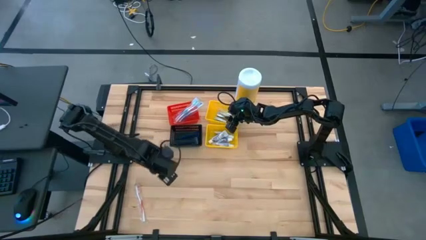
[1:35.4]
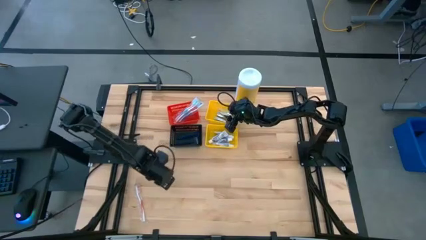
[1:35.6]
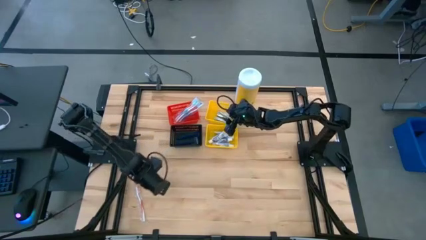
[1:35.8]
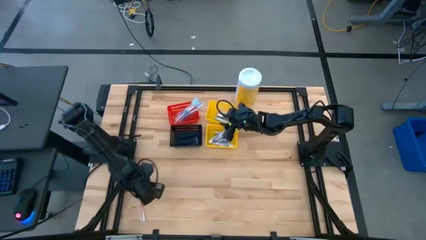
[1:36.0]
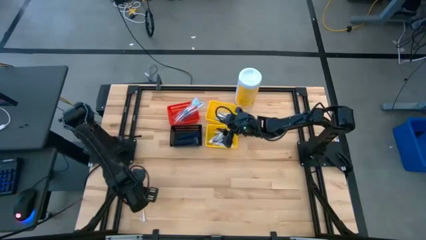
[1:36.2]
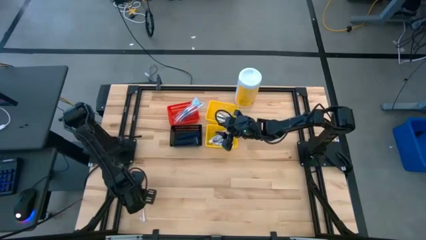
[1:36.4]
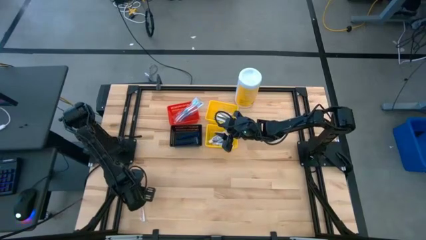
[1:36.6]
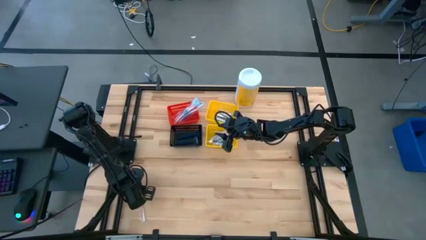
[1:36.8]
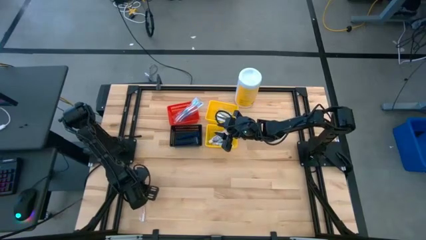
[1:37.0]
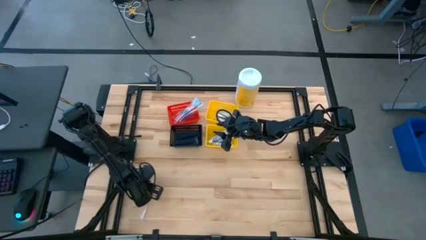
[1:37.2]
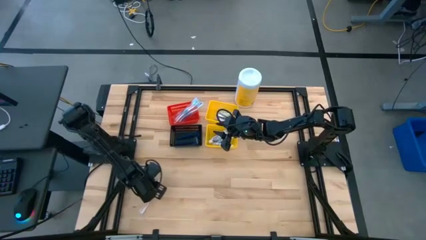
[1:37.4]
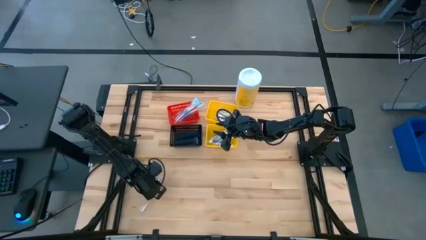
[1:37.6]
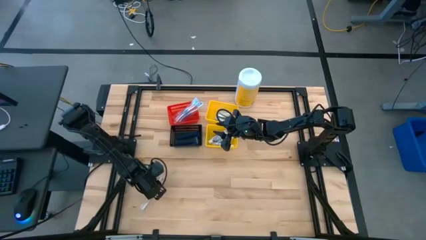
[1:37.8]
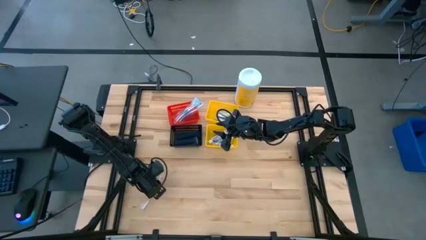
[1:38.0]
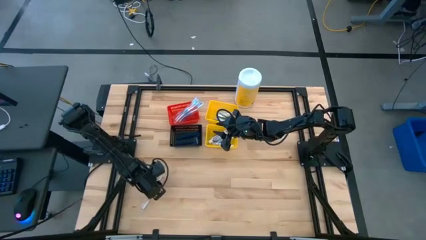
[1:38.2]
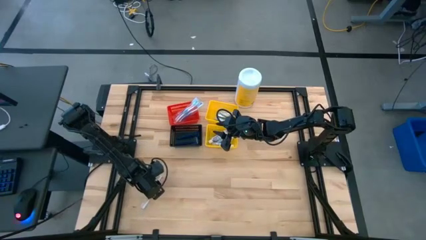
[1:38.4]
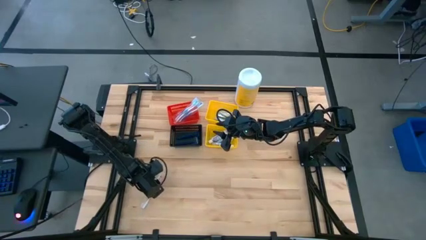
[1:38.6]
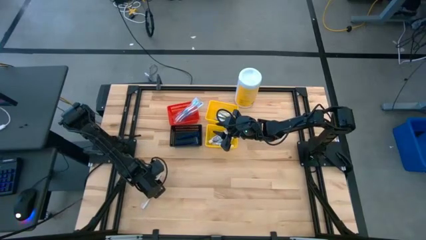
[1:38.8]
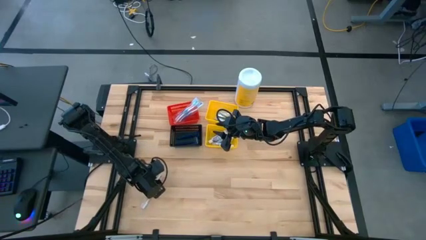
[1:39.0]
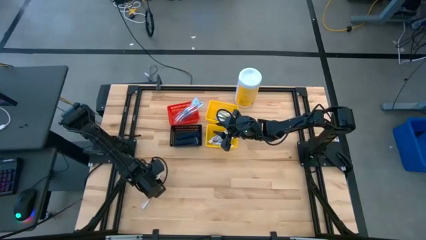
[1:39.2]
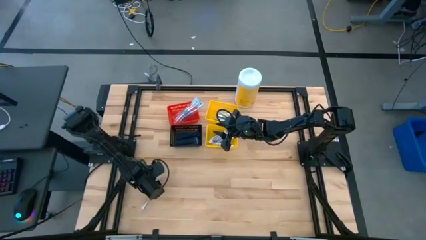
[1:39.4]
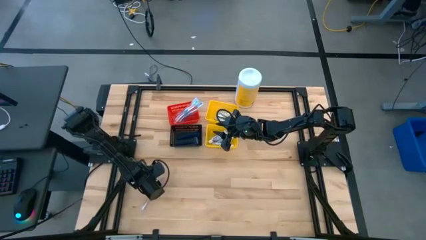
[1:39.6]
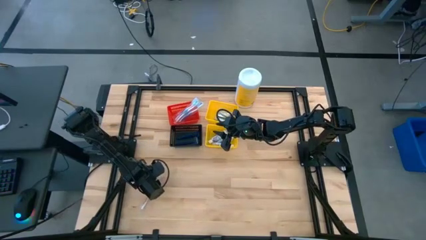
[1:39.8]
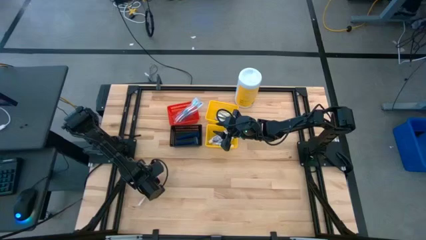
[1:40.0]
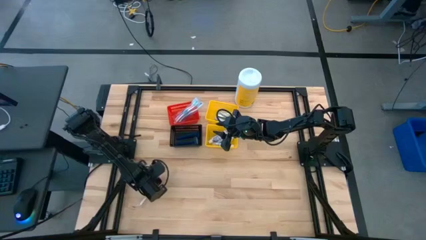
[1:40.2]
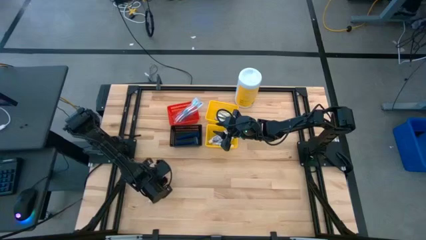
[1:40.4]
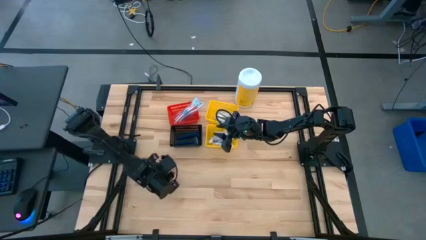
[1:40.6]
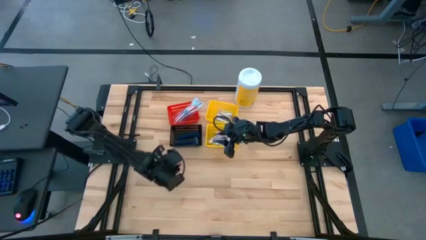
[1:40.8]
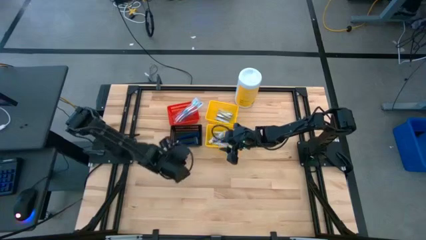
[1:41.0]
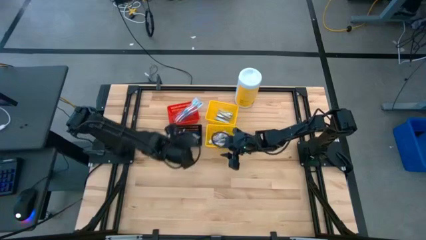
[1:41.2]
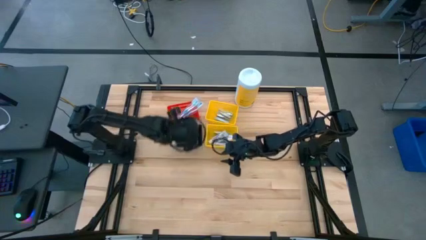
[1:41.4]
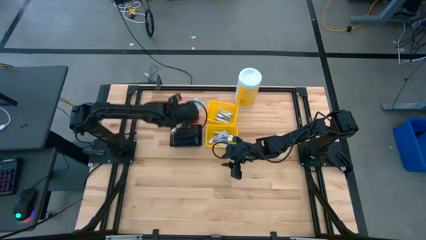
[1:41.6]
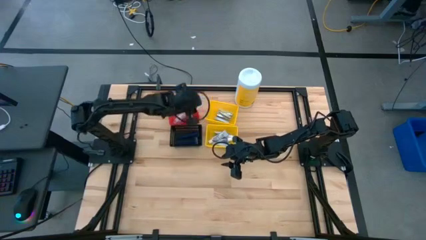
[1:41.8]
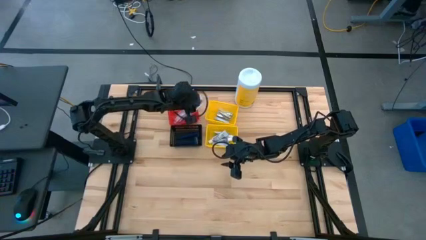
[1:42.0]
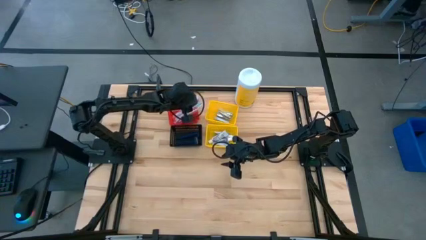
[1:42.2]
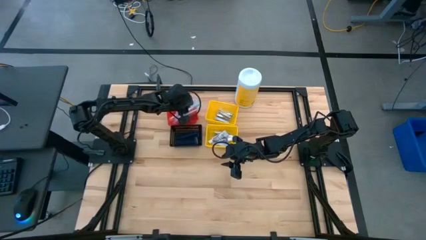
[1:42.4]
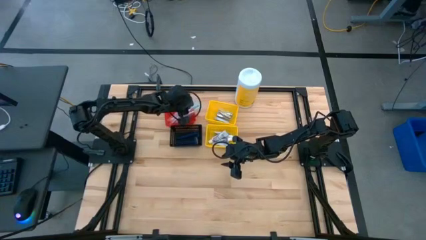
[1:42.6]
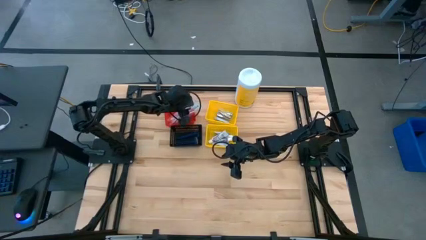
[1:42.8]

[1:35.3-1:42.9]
Task: Pick & Place Travel size toiletries
Put the red toothbrush into the red bin

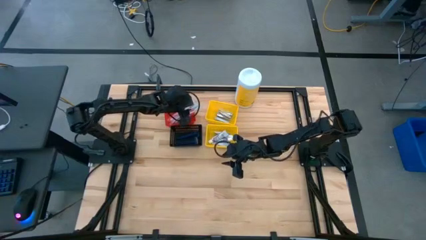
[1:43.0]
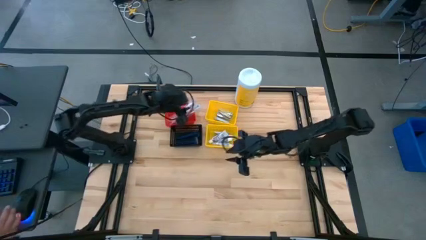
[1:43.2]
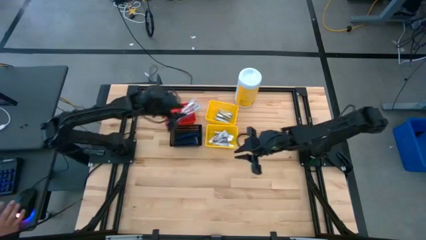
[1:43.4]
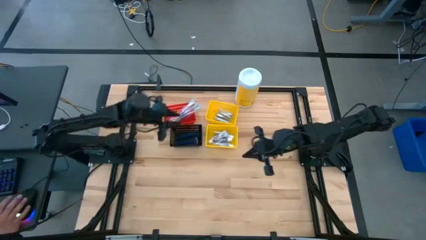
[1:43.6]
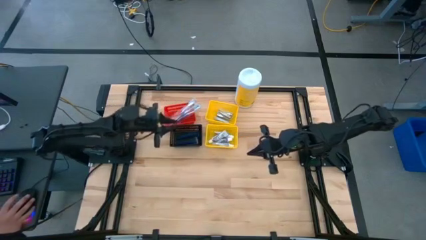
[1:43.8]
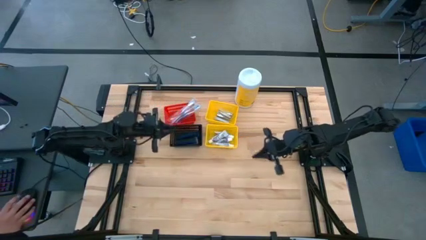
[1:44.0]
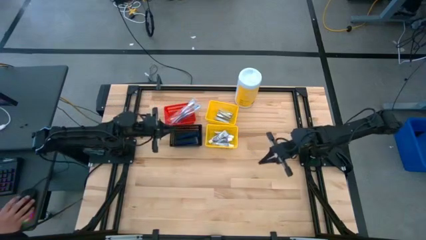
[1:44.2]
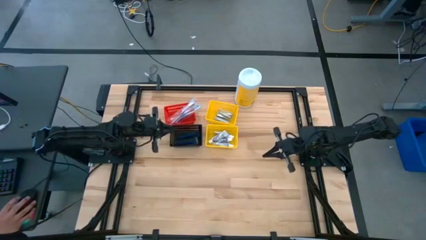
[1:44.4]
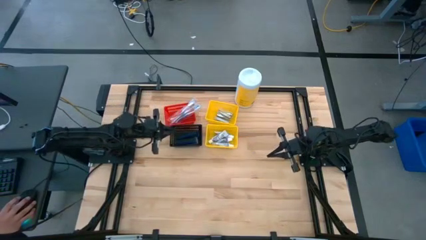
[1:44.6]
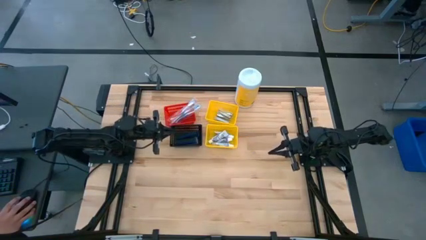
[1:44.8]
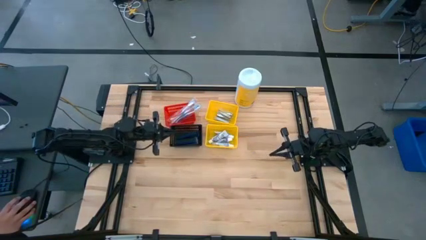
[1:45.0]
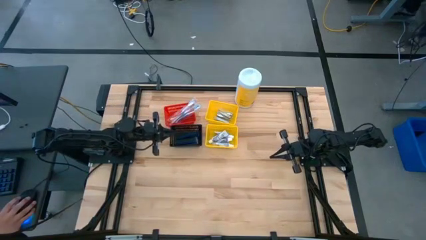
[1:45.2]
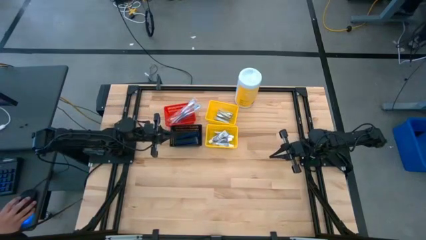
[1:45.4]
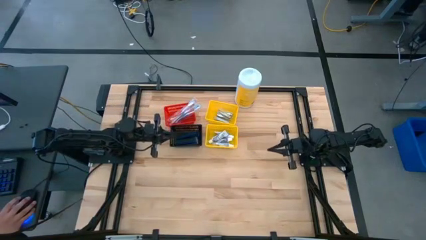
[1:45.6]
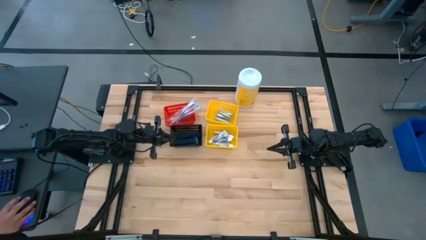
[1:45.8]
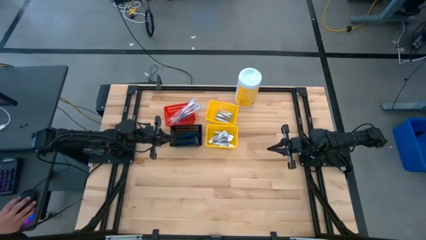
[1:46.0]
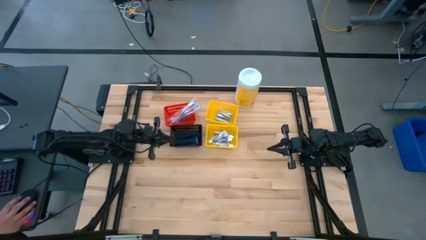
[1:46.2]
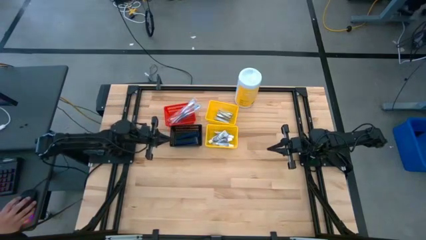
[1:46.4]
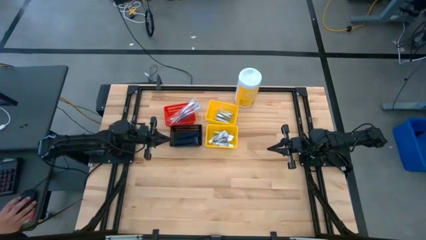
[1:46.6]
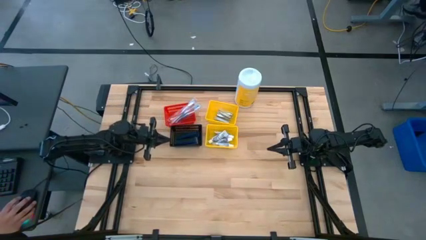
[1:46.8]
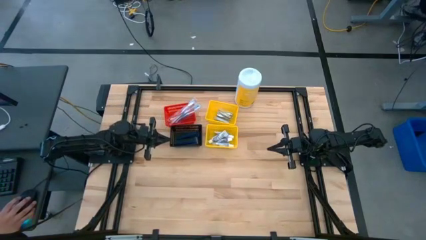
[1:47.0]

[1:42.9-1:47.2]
Return to Home Position

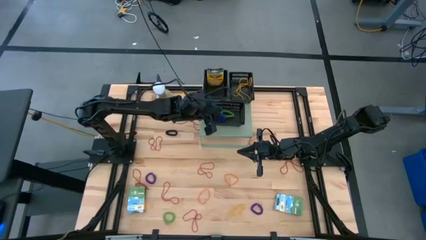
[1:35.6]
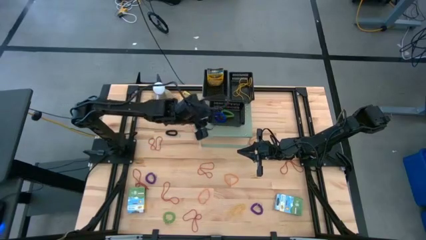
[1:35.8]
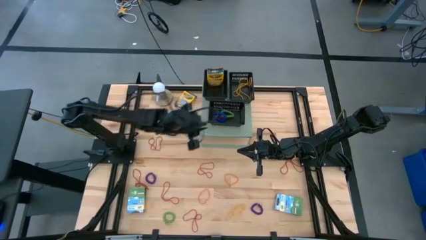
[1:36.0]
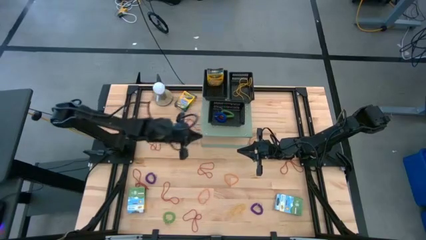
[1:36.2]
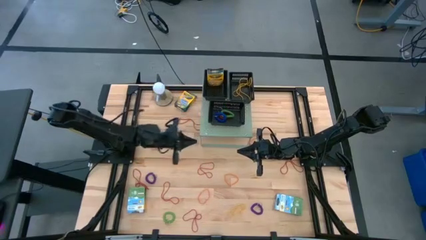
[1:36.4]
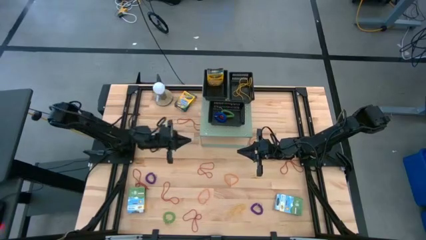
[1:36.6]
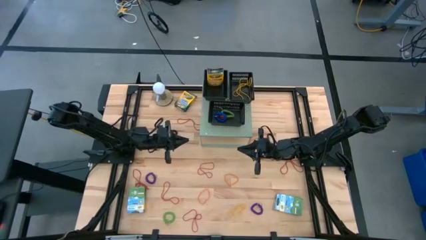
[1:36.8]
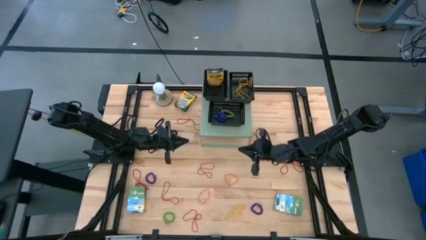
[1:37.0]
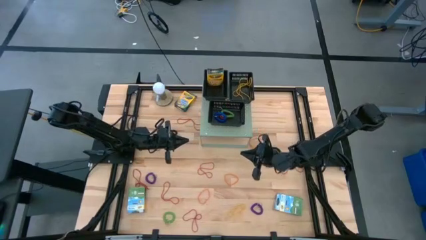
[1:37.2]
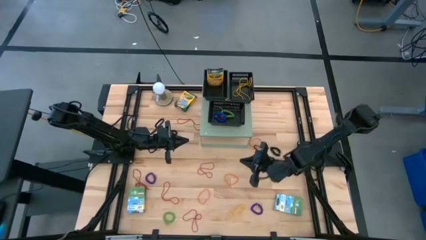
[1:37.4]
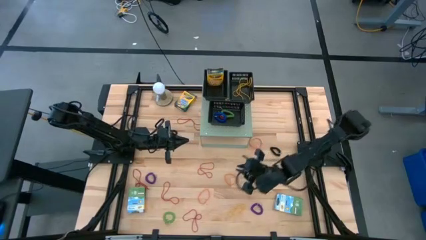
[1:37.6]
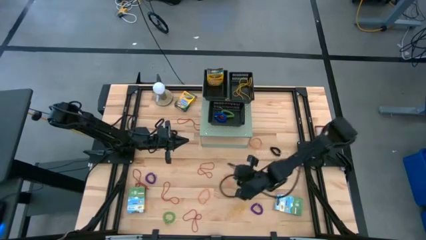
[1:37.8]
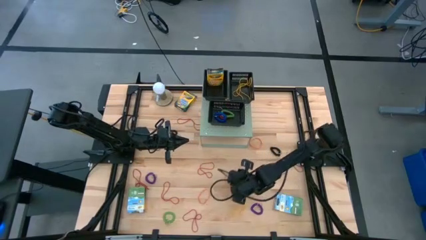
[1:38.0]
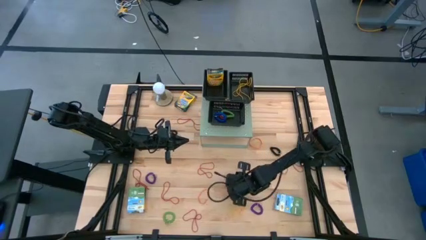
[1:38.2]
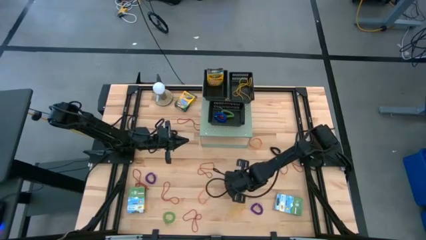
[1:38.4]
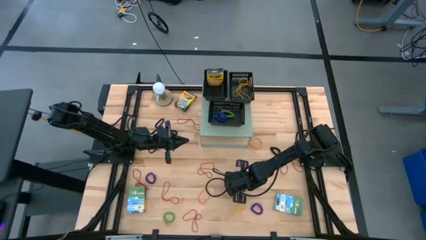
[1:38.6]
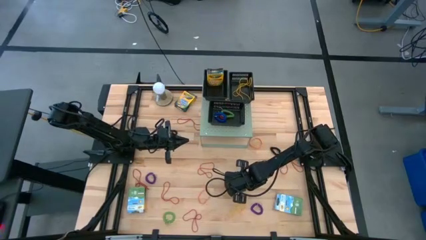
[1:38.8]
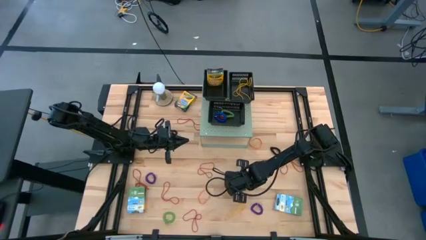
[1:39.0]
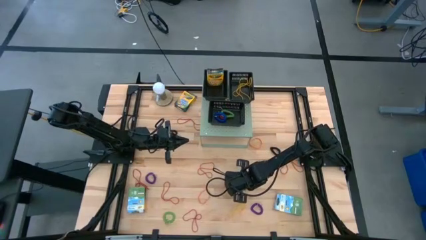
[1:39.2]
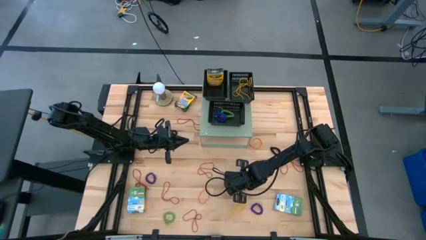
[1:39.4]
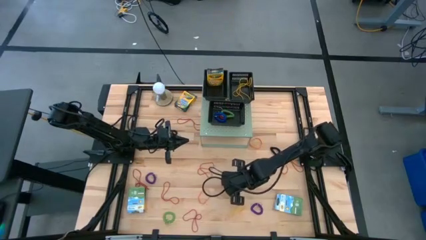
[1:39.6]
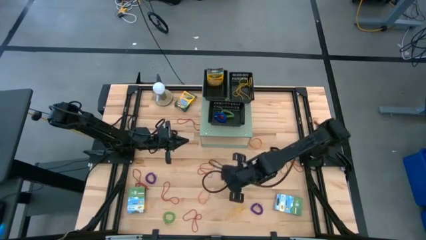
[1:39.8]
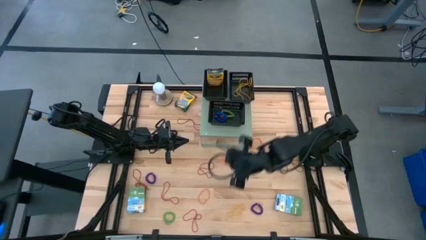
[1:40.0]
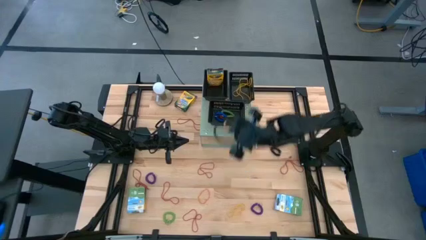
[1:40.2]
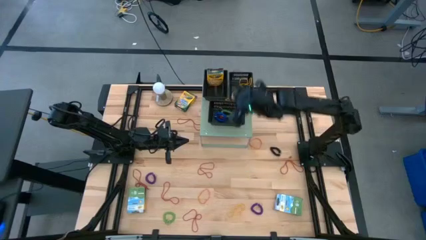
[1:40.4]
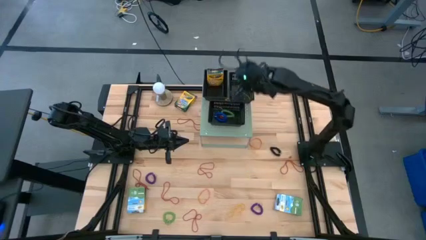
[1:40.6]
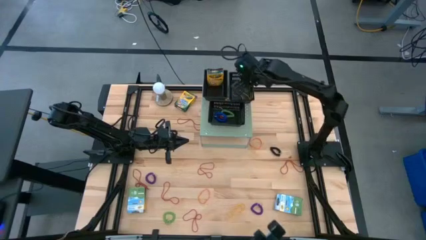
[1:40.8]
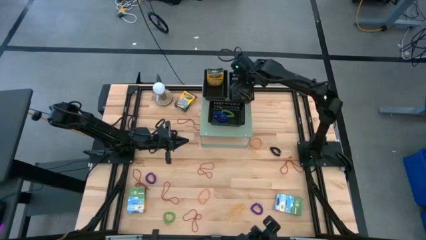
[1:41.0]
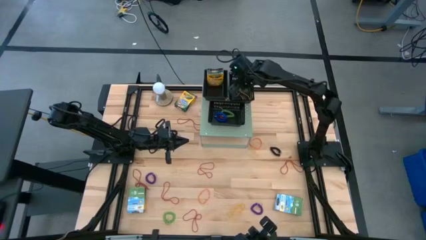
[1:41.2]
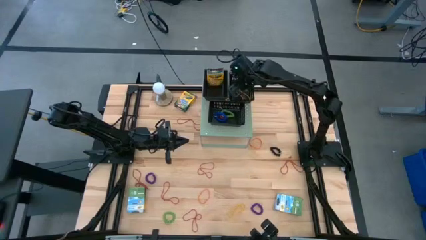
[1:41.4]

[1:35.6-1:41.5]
Task: Pick & Place Office Desk Supplies
Put the orange rubber band into the top right black bin on the shelf
